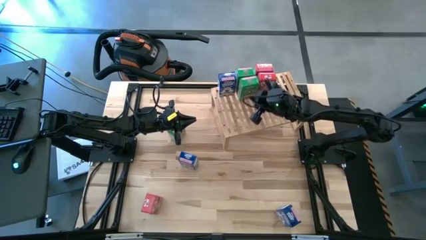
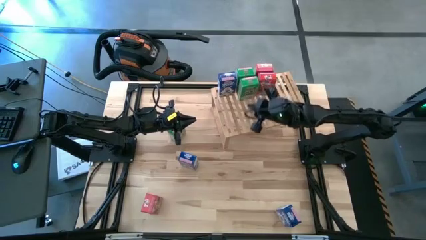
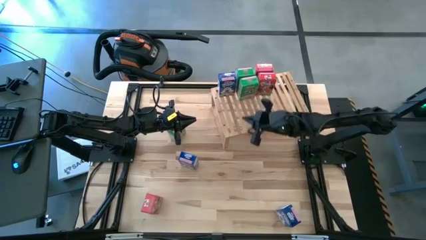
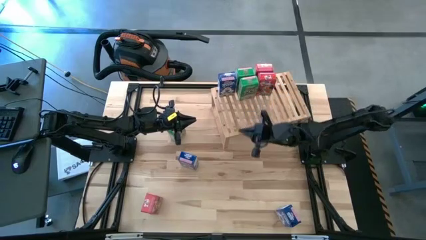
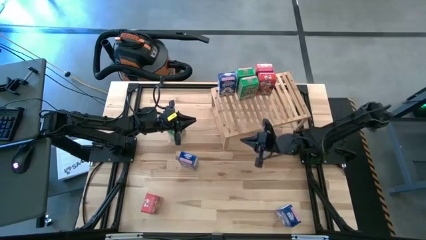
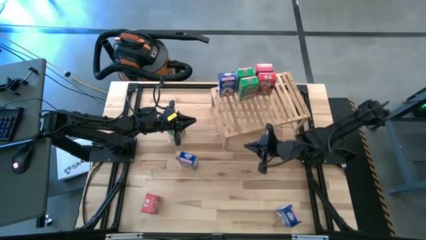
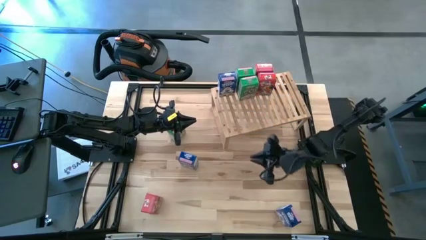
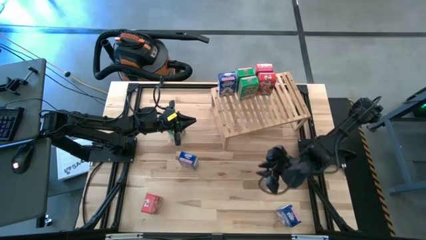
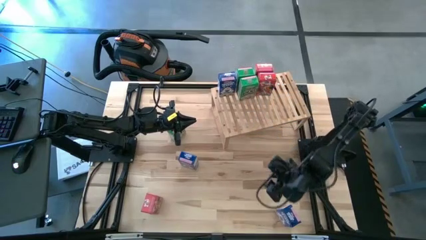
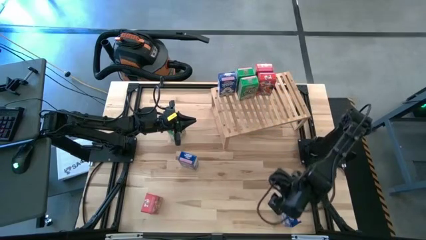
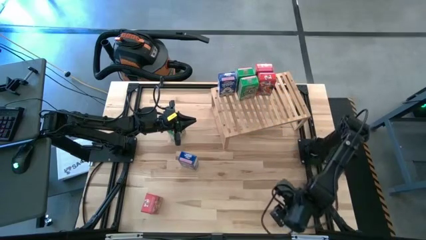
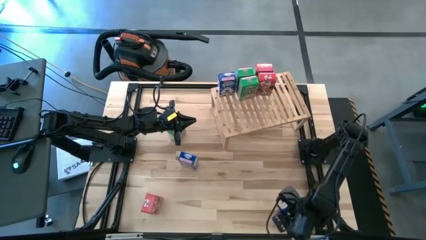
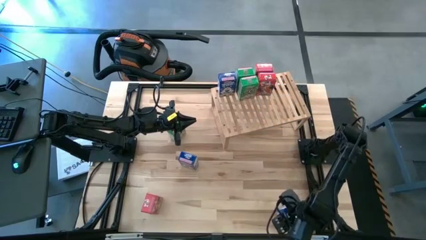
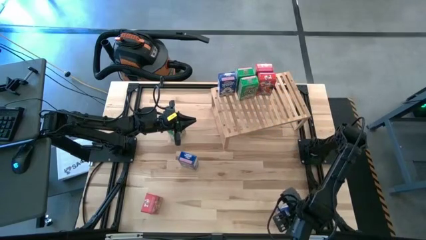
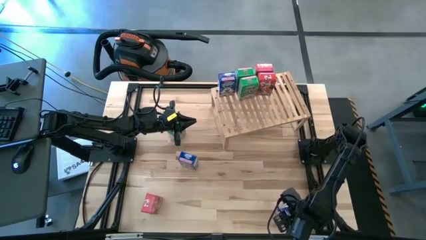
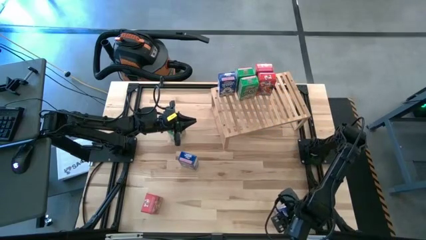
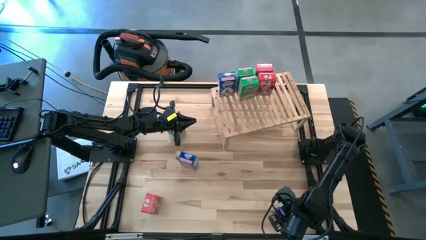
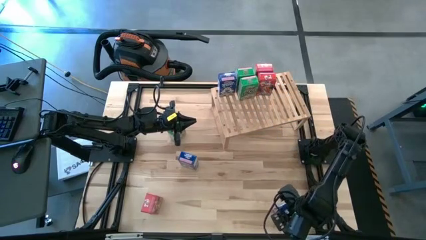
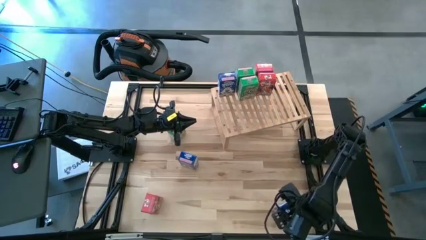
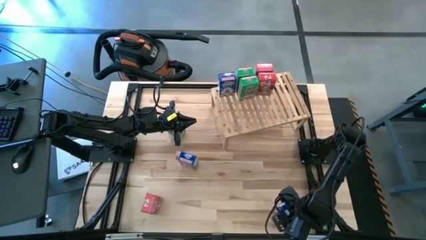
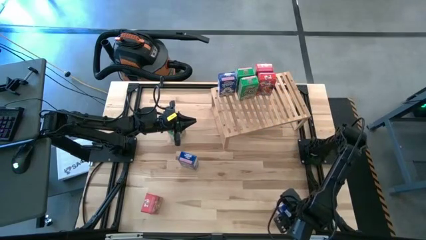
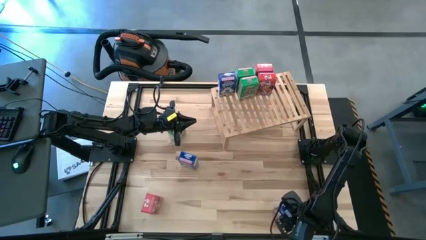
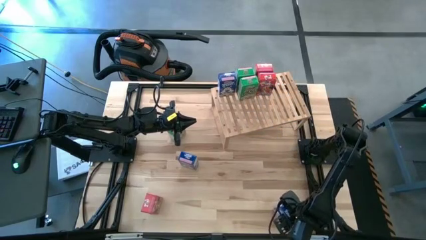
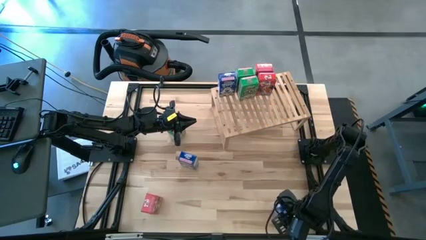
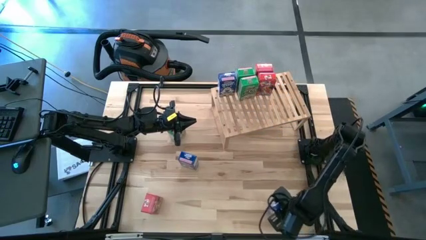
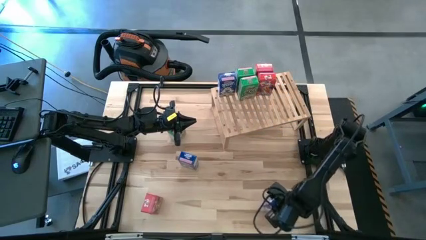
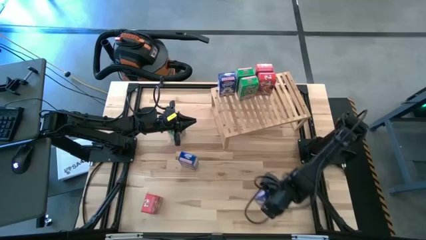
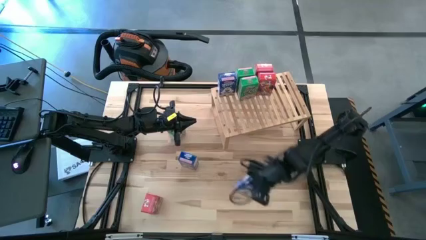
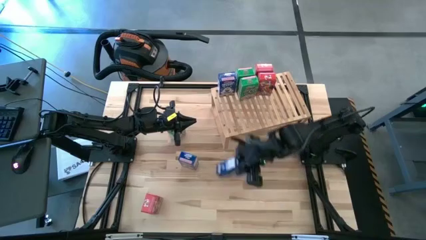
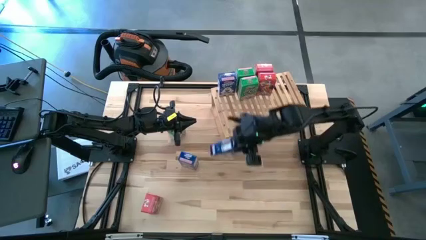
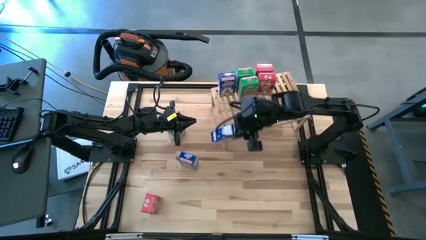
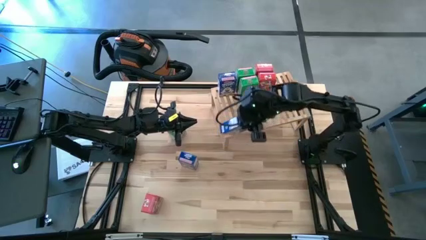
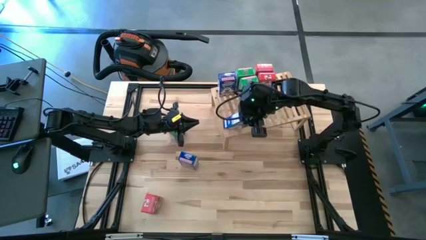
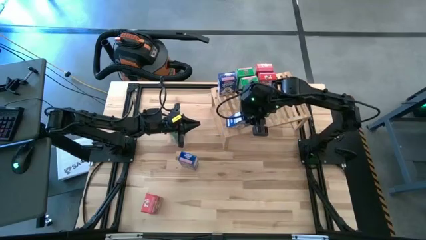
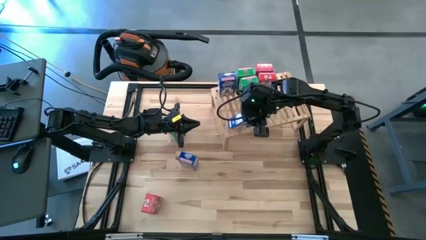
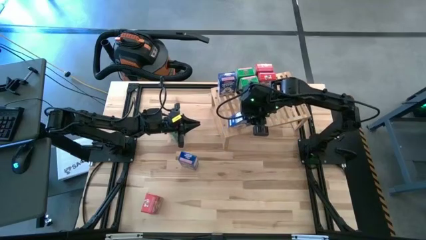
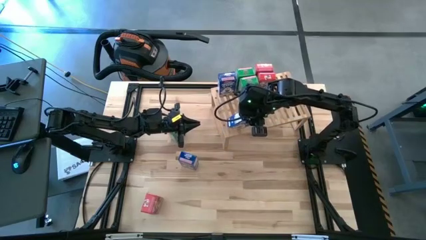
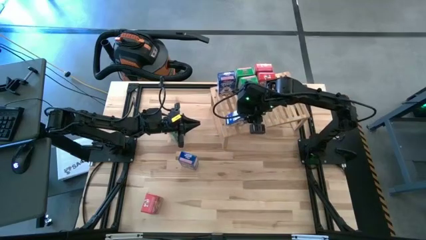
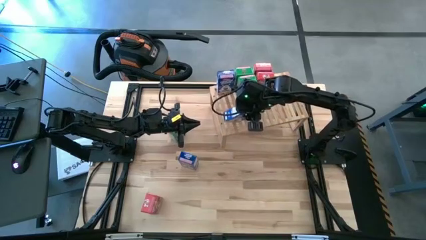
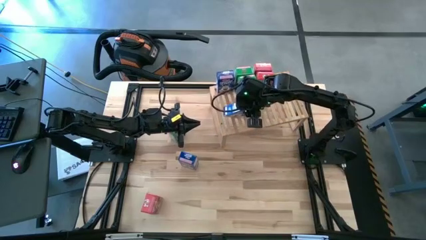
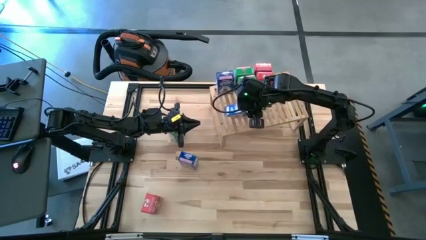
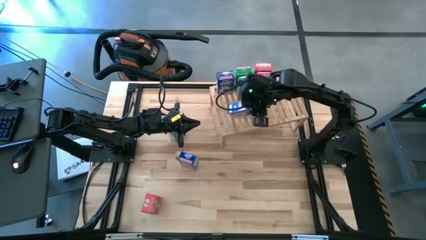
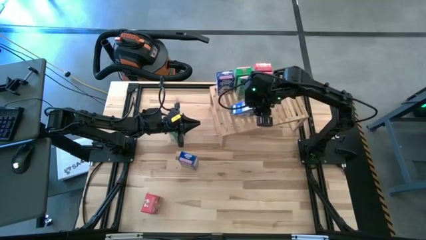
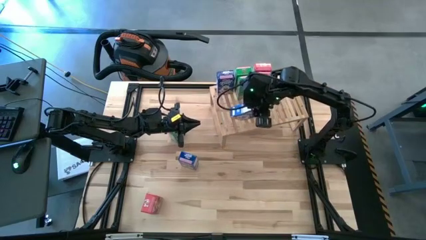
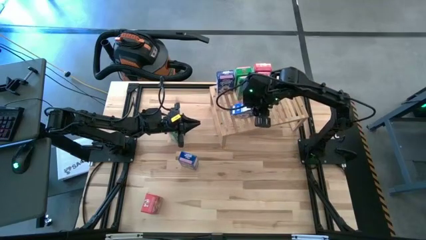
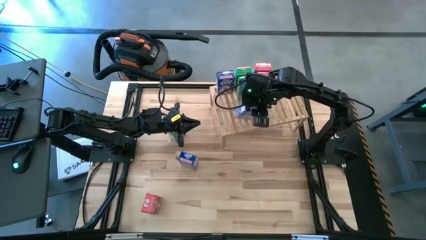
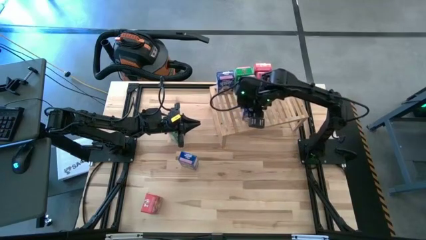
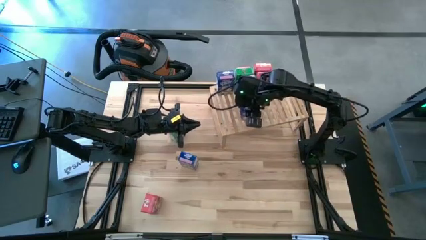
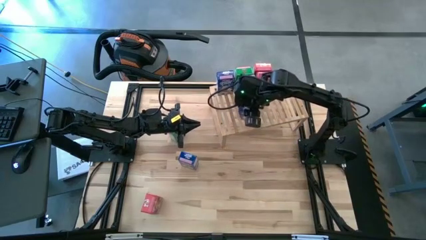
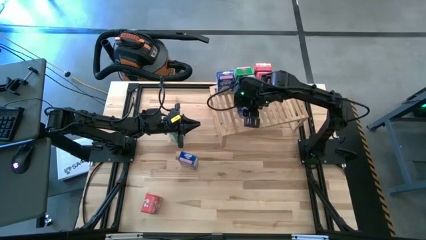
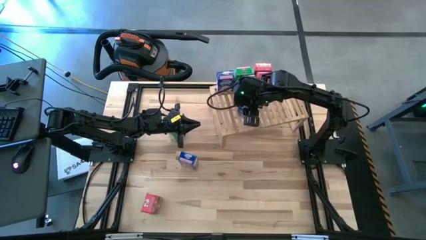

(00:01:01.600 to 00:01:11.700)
Task: Stack cereal on shelf
Put the bottom blue cereal box on the shelf aligned with the other blue cereal box
